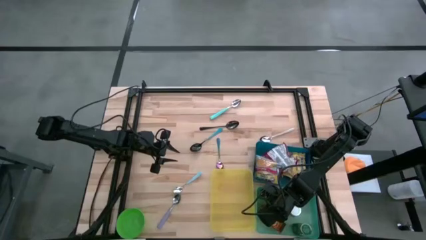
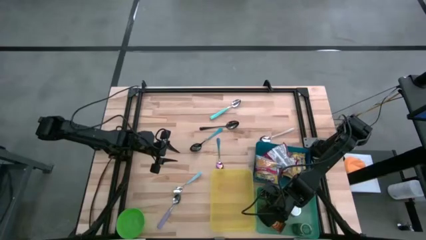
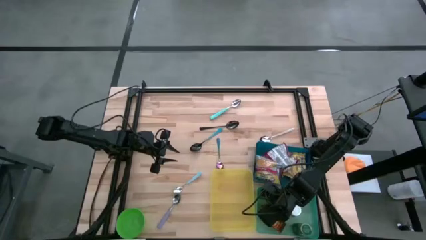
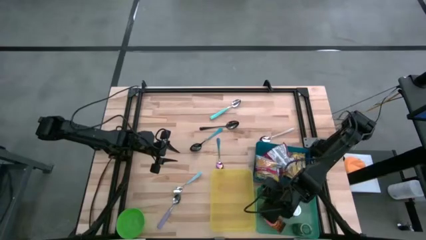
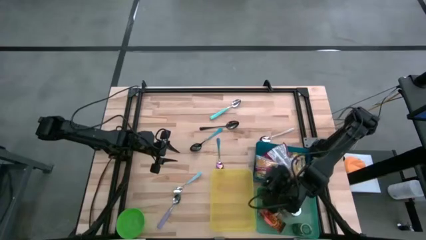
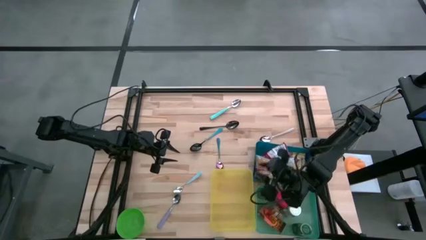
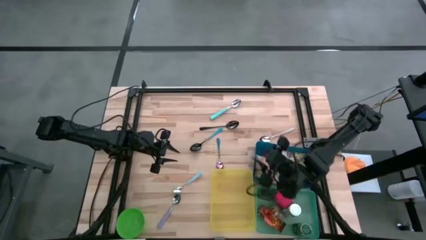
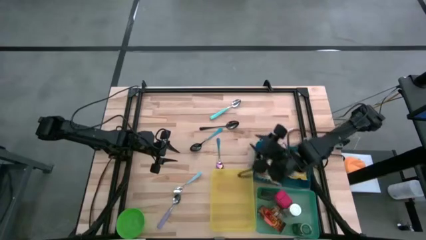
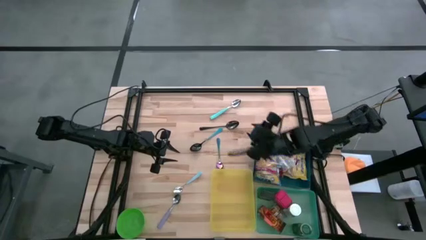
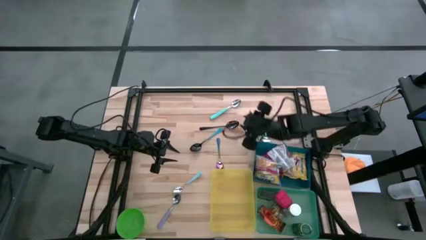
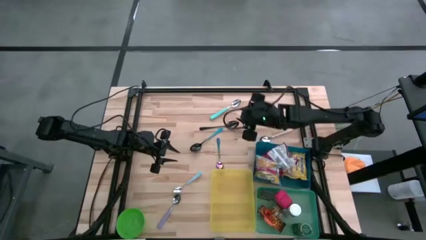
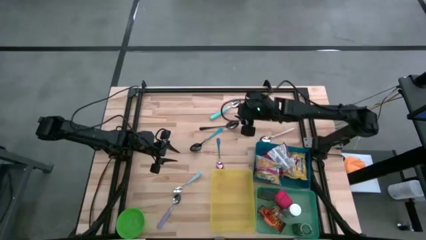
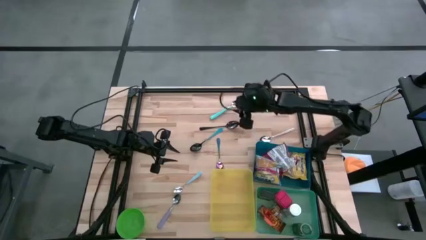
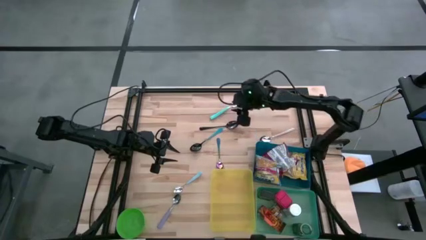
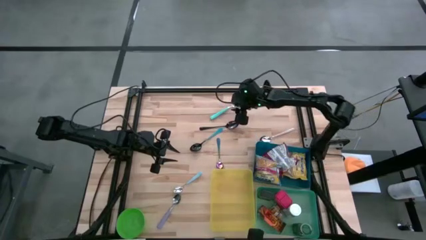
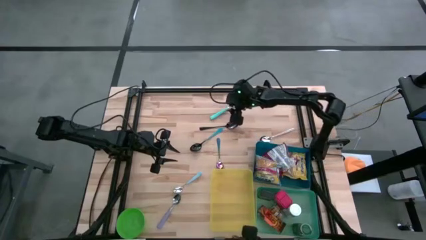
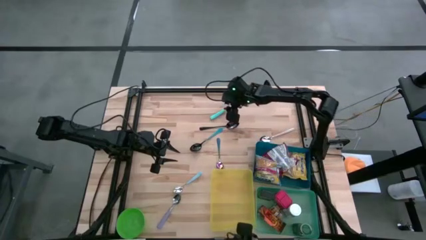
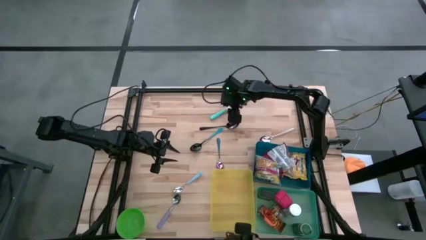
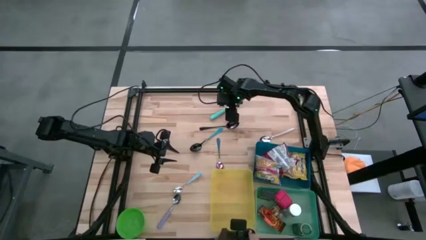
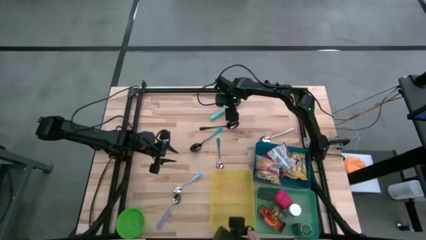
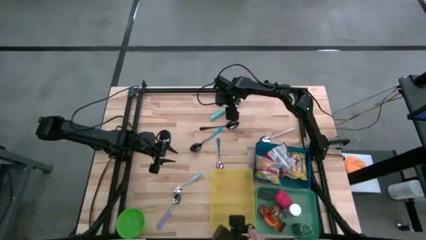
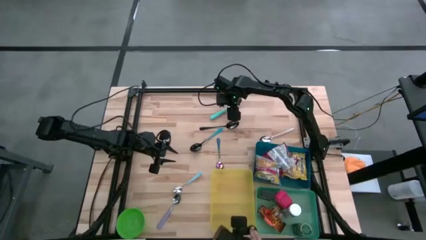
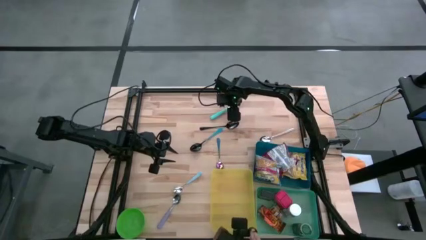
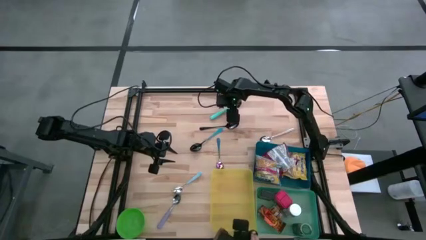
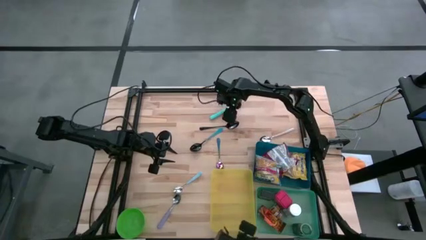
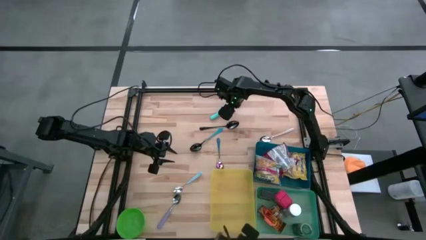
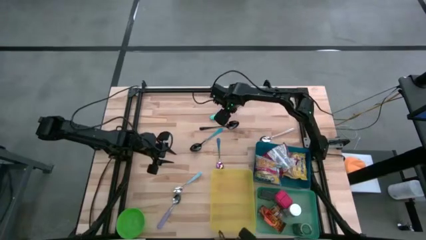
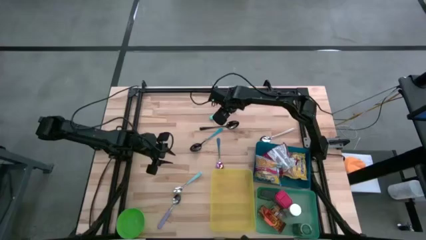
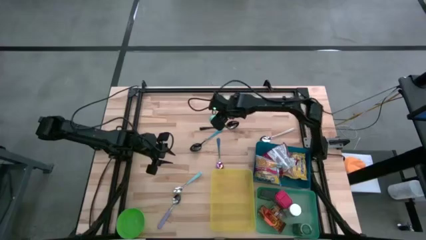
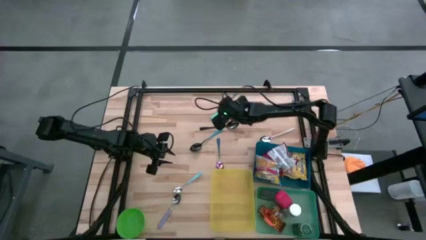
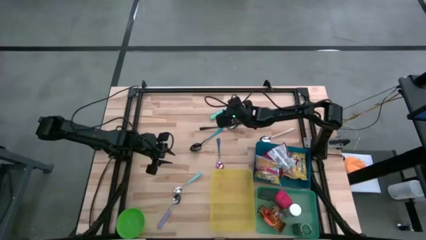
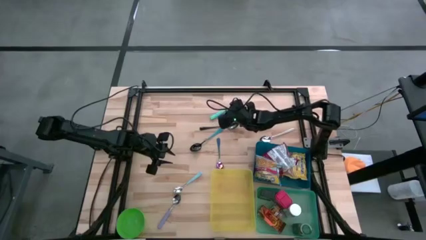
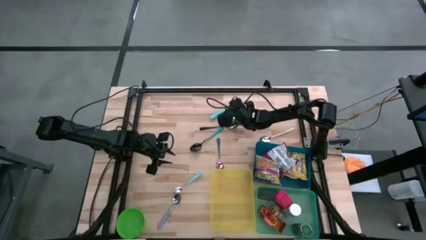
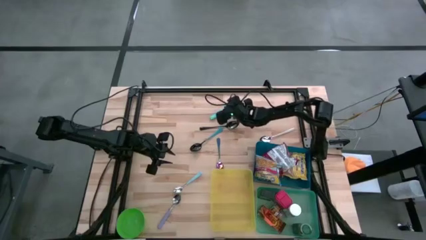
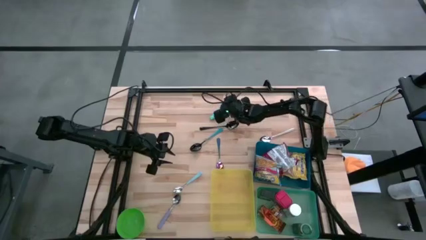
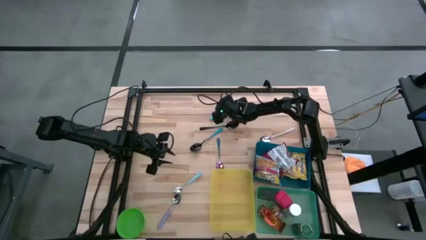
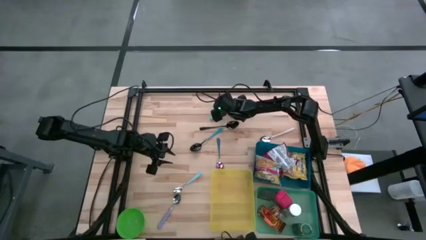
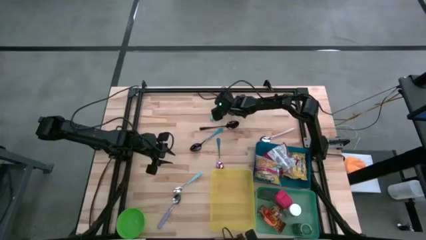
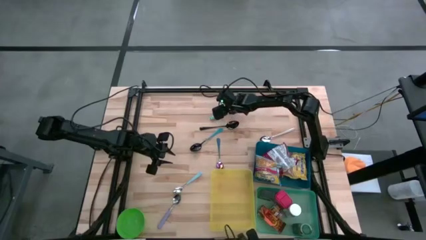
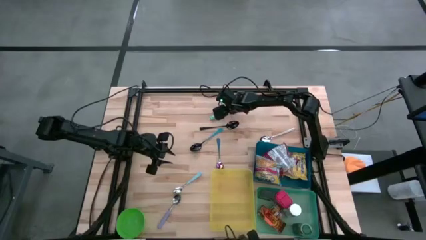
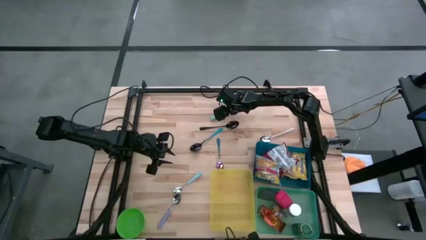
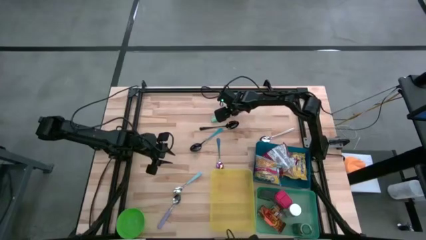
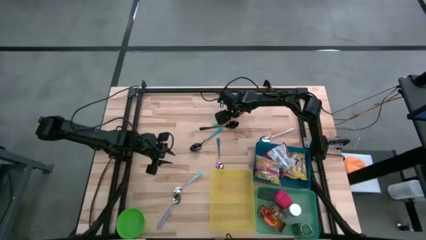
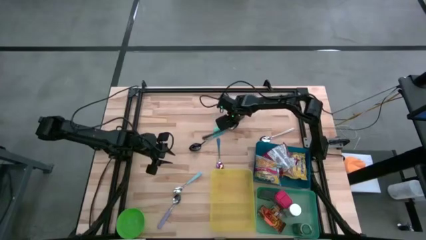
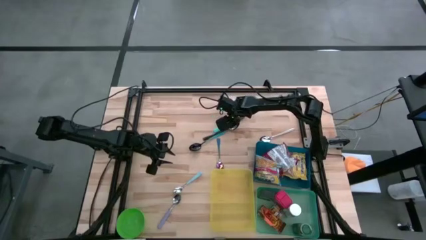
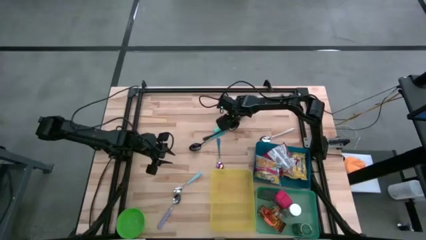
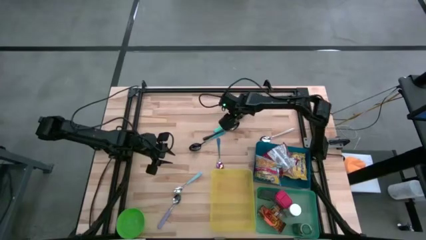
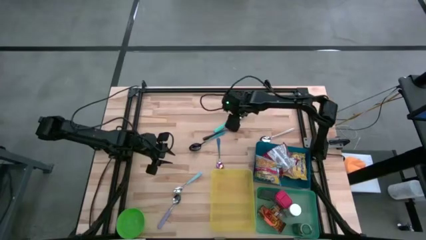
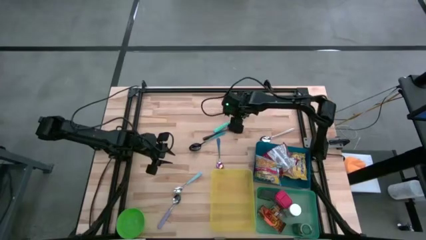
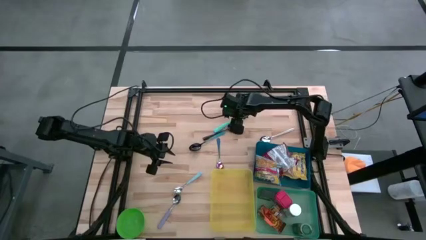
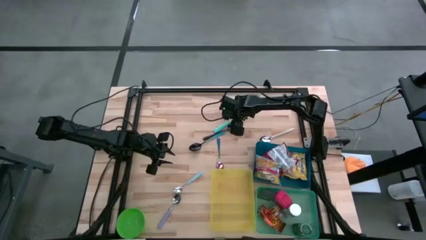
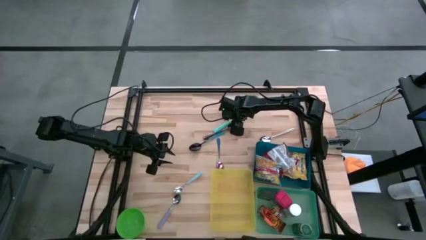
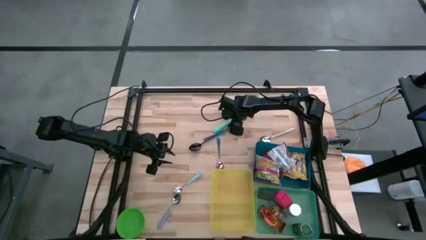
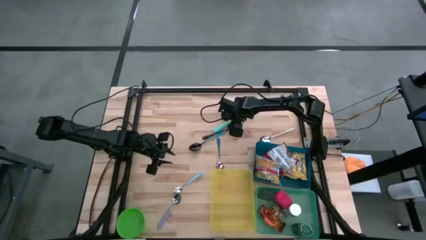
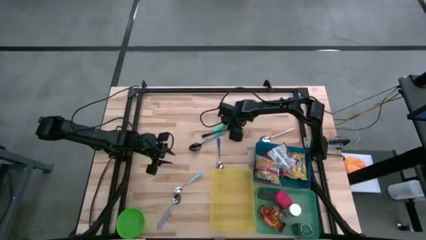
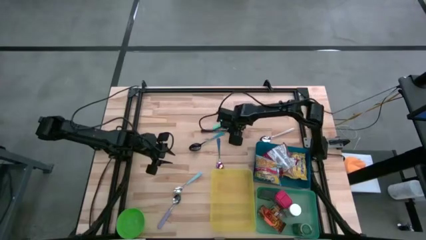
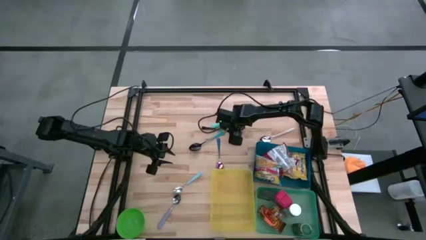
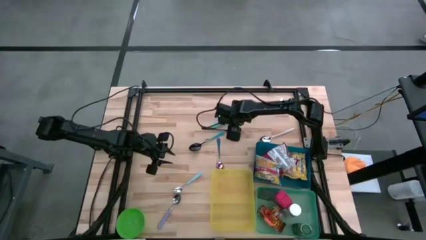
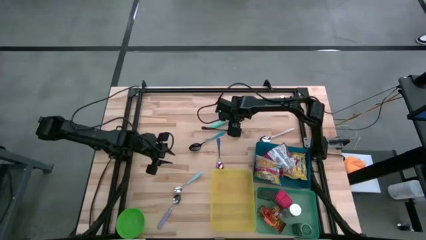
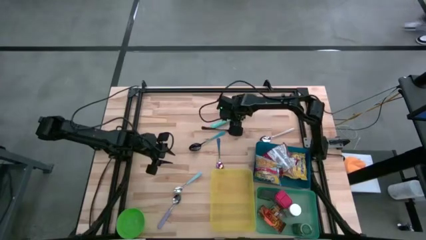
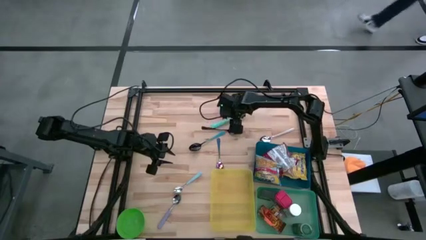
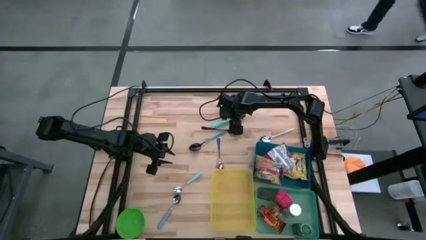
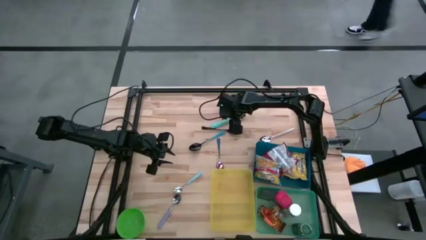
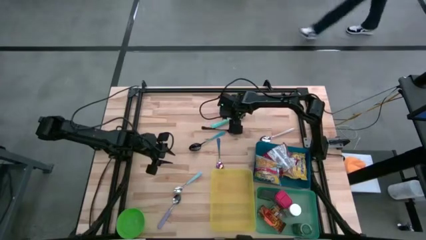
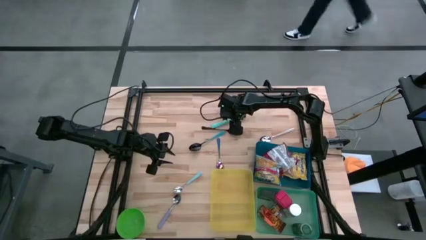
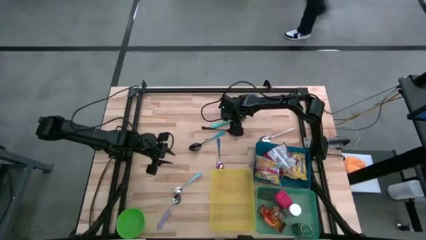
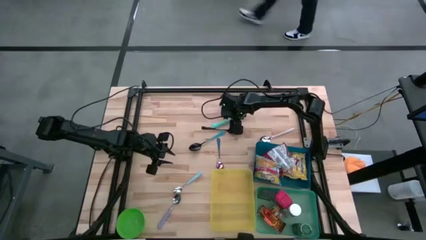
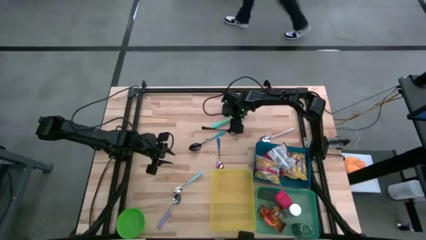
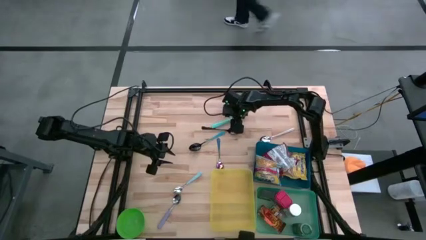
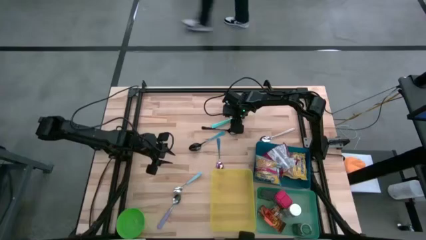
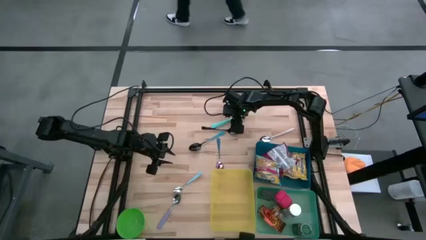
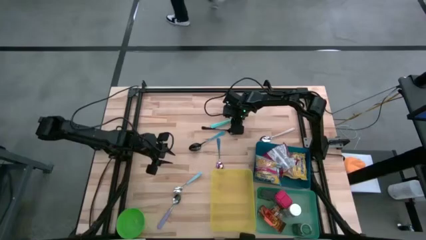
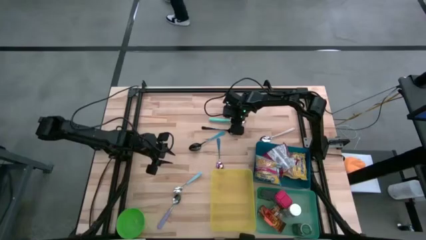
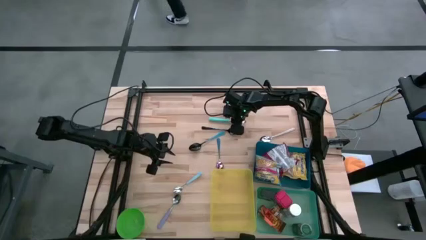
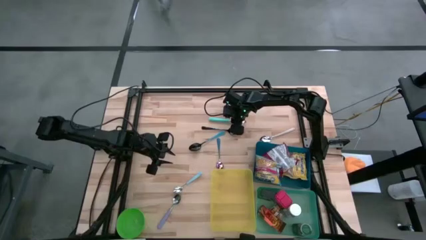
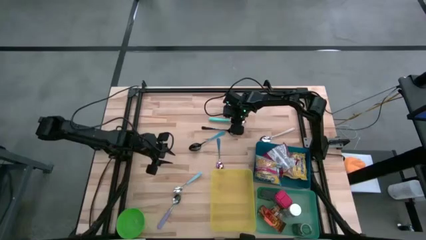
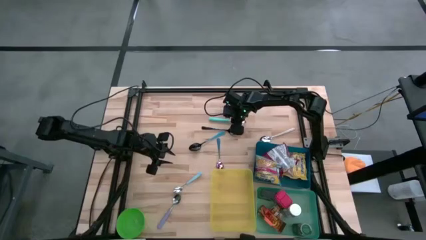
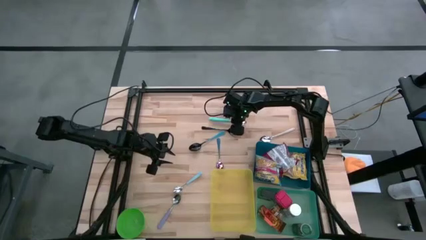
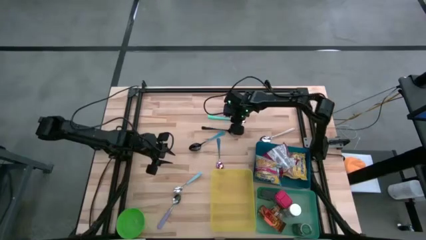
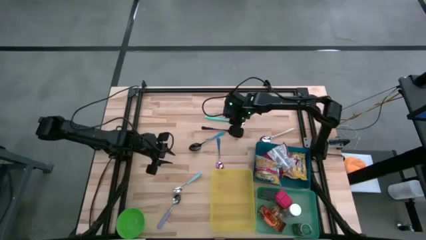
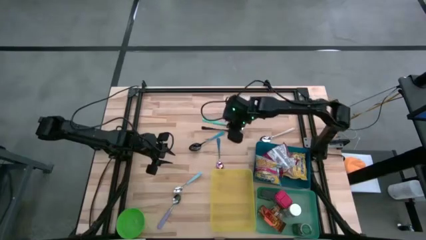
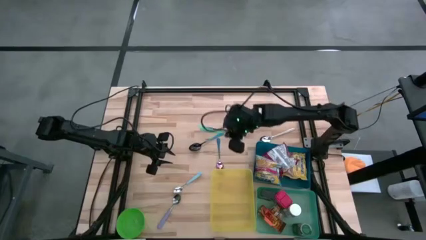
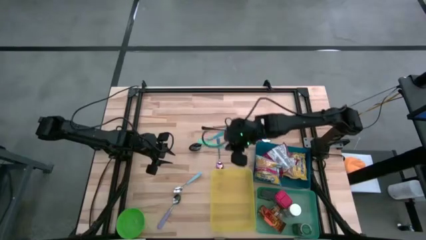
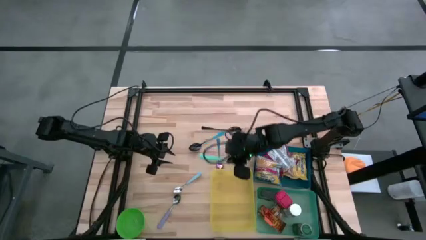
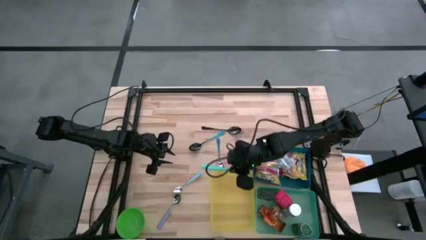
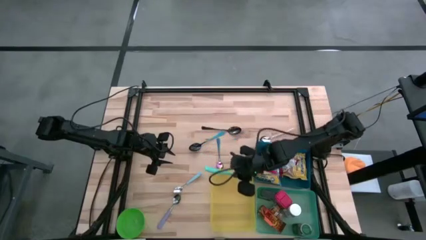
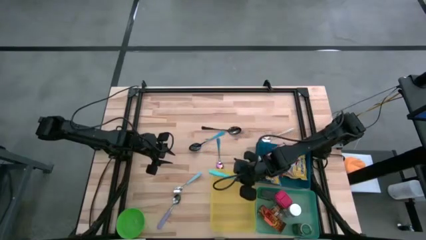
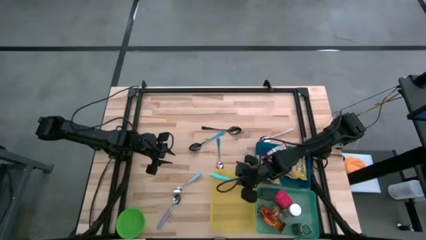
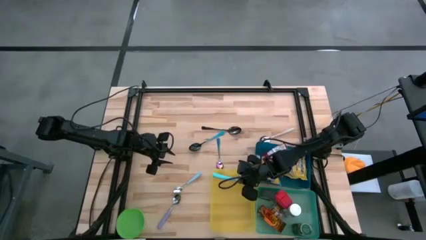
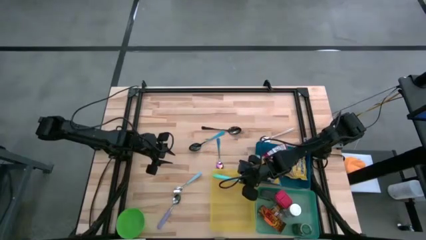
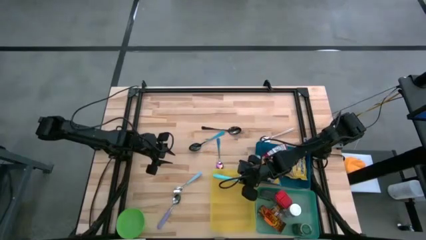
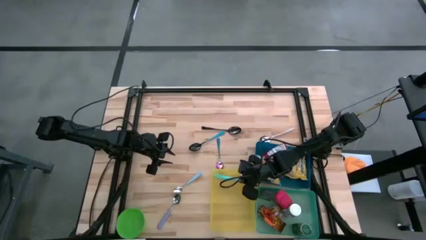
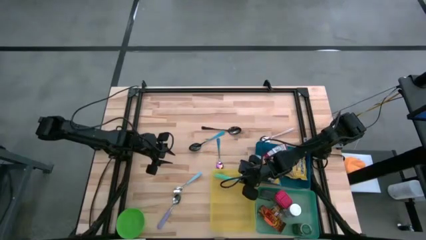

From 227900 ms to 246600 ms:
Put the light blue spoon into the yellow bin
